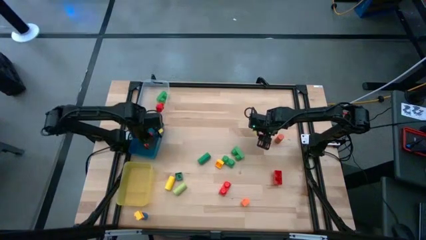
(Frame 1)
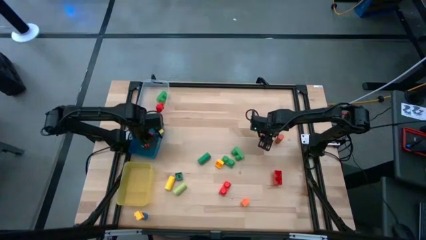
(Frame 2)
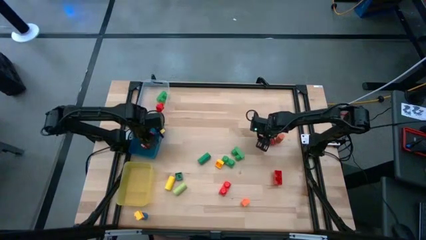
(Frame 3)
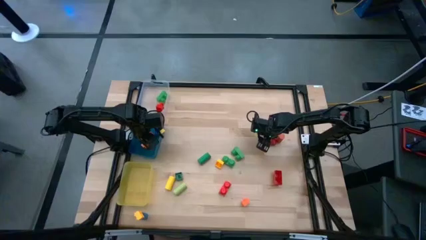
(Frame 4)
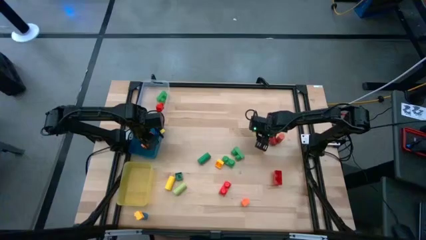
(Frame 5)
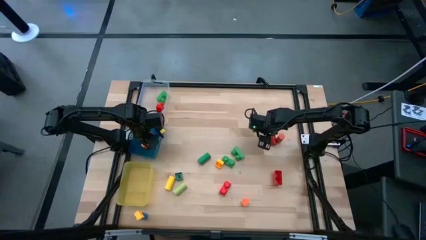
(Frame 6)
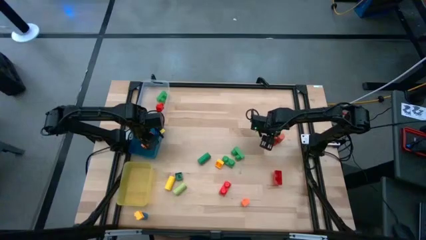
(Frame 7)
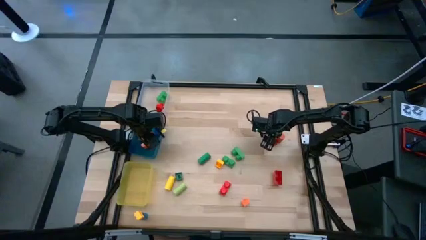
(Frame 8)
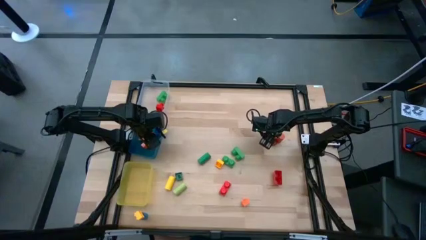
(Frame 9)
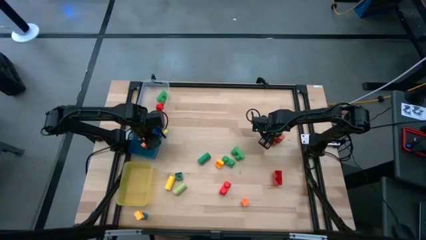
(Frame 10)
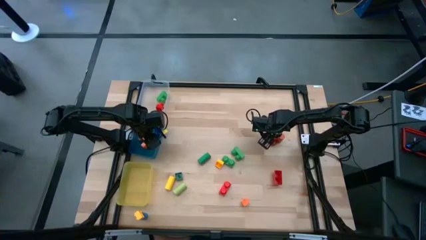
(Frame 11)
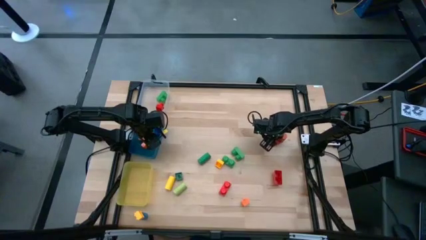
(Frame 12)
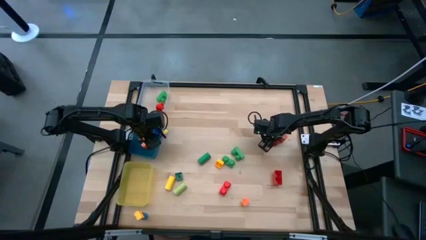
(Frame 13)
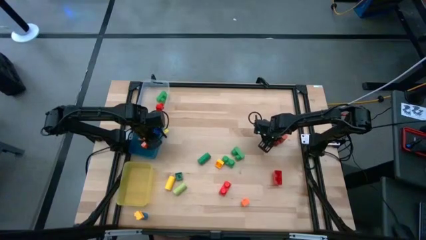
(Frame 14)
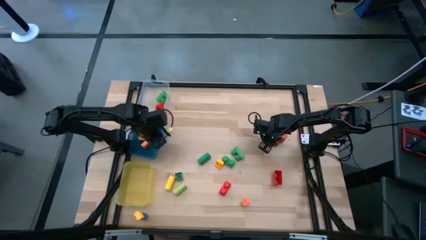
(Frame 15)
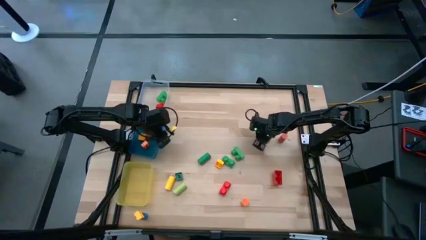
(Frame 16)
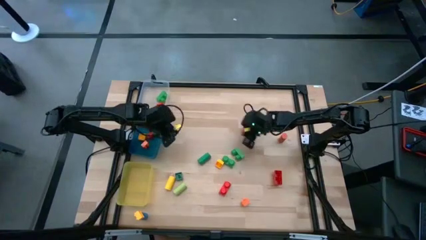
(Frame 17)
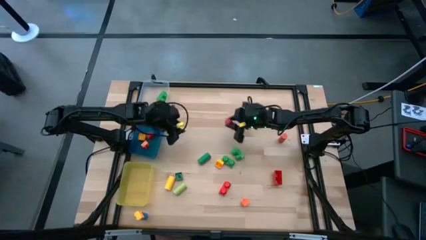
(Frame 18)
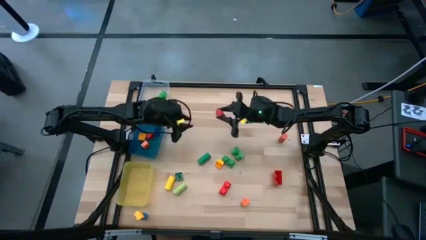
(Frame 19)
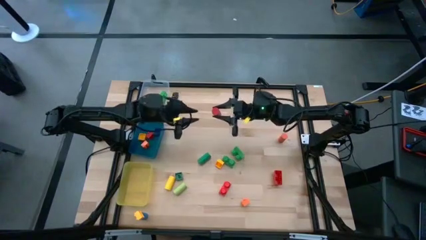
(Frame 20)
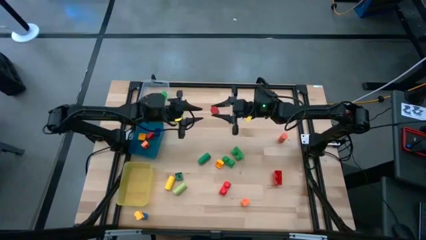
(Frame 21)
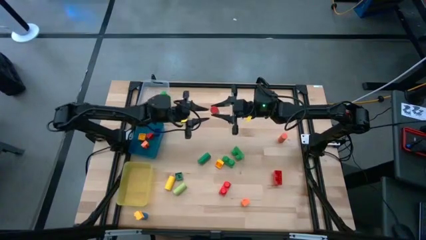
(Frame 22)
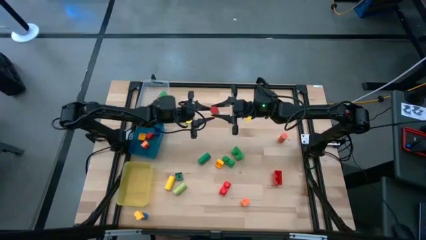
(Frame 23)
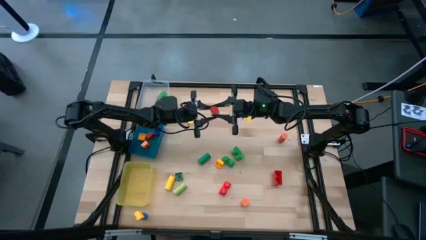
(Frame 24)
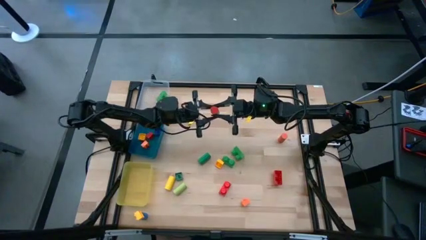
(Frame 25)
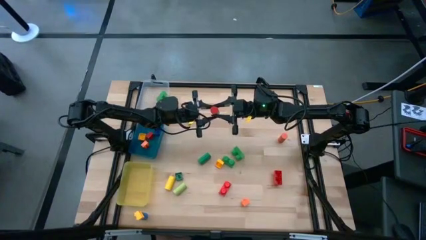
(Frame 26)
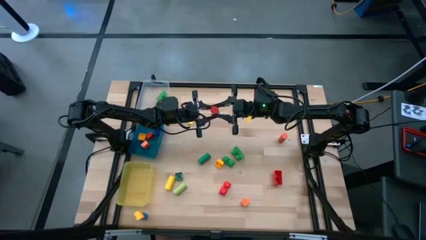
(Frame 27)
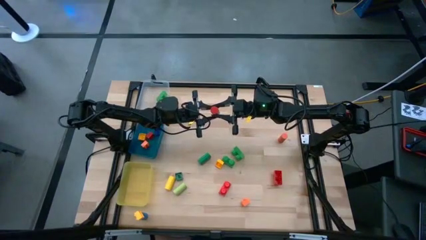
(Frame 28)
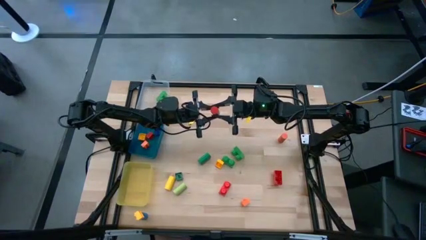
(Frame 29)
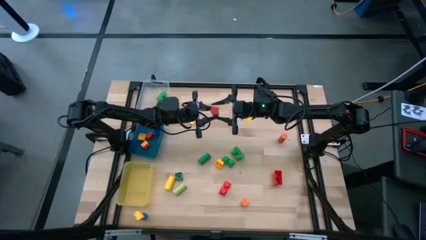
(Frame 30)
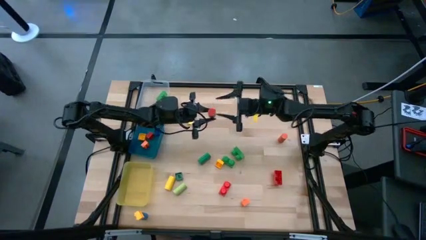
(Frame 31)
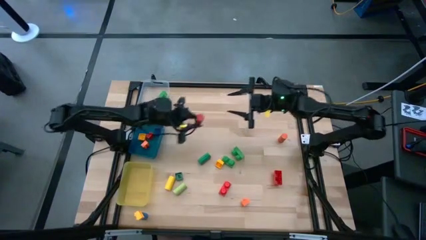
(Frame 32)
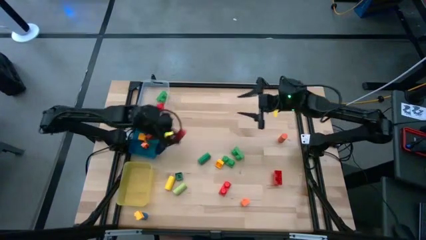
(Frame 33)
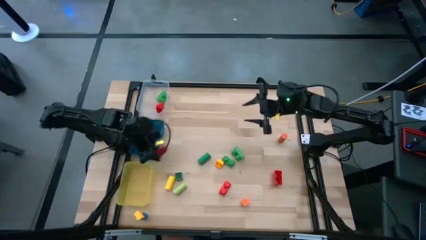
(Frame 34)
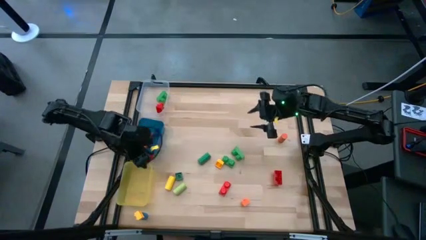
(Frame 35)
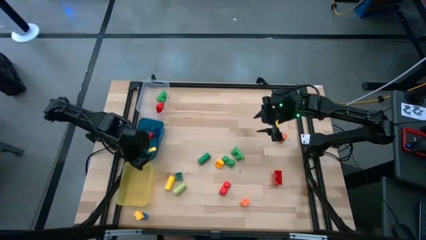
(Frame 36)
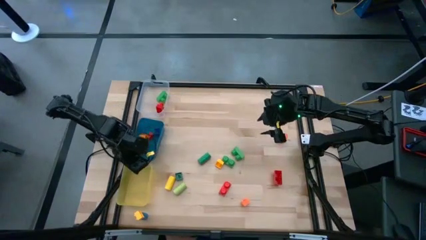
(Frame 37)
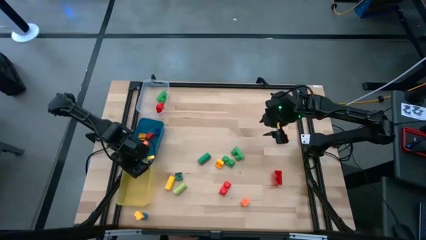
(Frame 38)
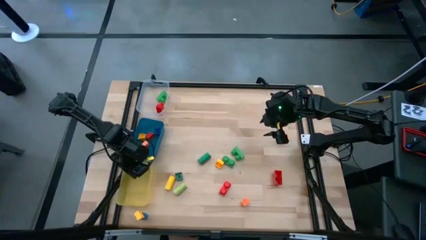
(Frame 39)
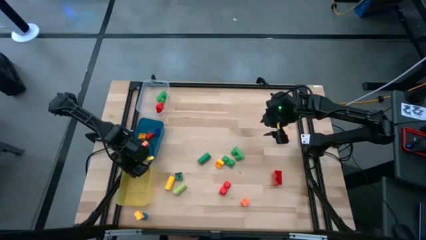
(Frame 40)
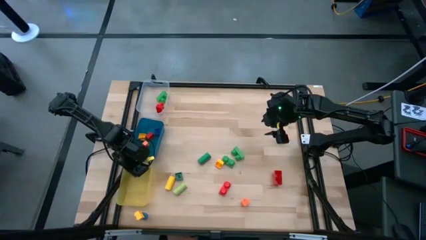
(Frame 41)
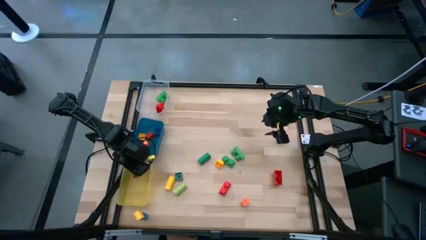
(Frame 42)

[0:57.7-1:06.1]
Task: Sort blocks by size
Put the red cylindrical block into the yellow bin

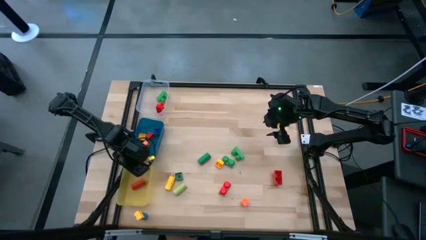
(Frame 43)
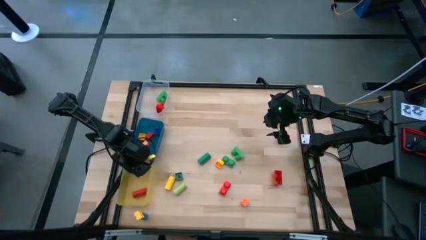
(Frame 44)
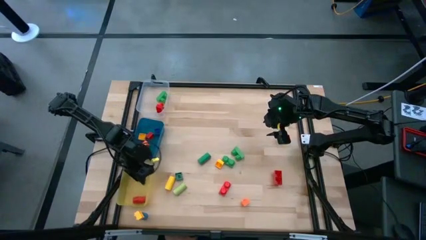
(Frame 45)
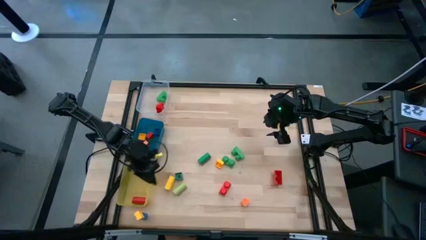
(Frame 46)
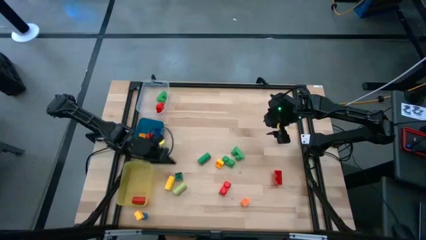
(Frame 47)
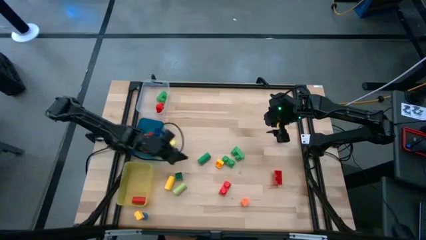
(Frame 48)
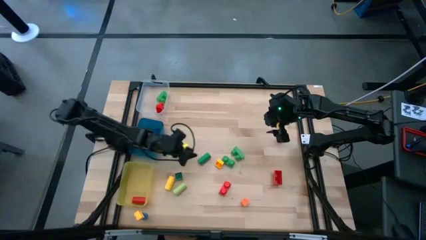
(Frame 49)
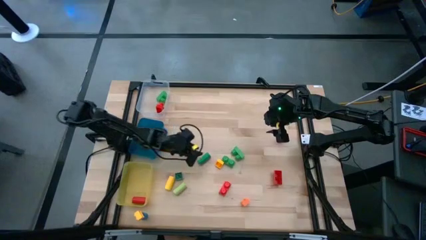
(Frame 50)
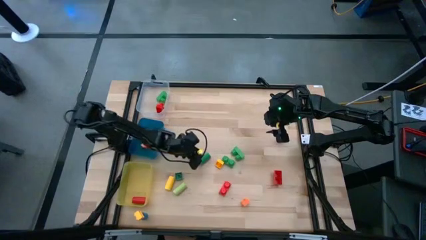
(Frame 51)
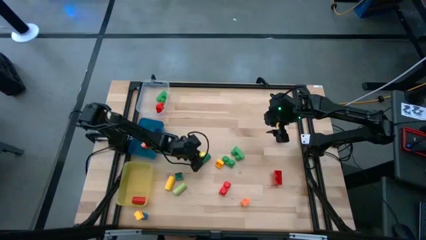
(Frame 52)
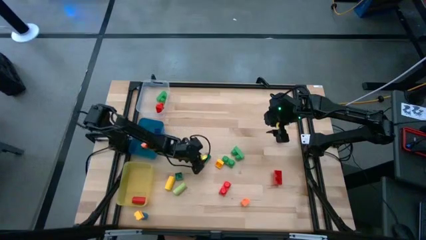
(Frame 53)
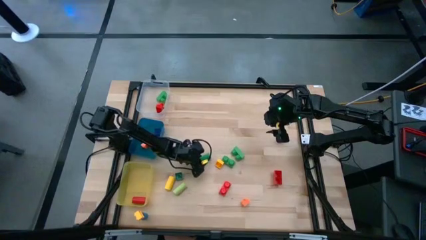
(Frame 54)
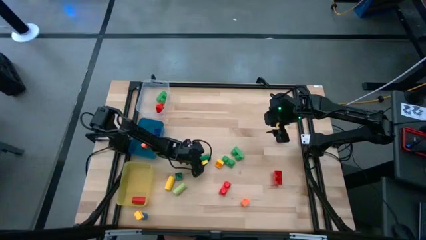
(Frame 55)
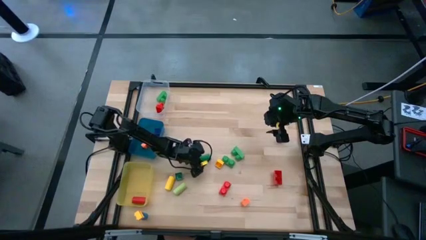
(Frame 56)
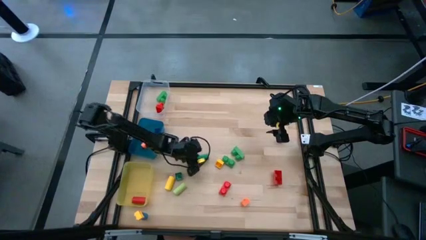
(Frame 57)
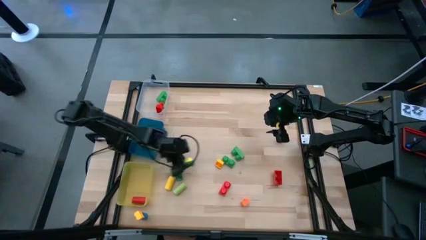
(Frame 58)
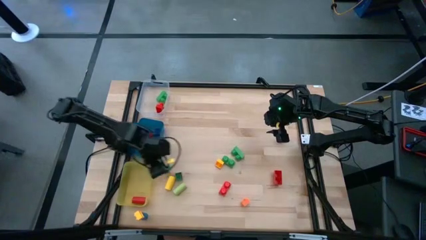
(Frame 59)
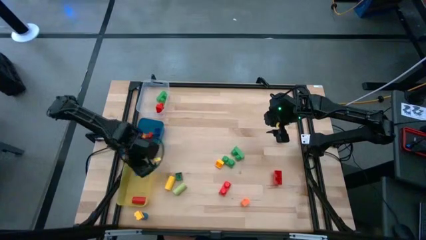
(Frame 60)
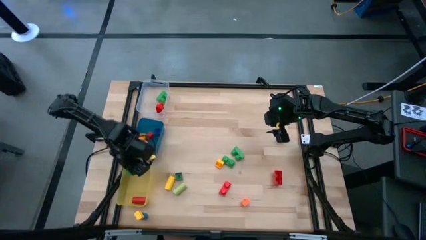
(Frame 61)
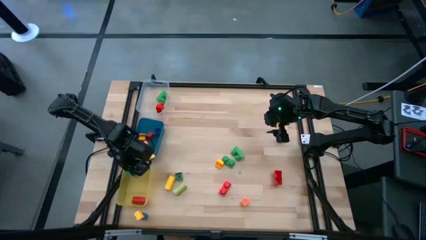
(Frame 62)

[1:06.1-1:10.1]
Put the green cylindrical block into the yellow bin

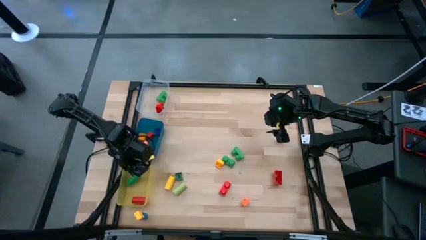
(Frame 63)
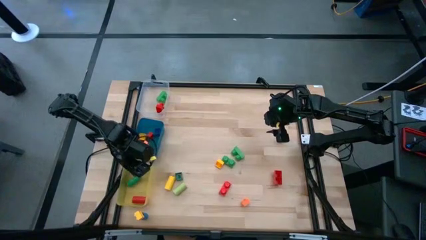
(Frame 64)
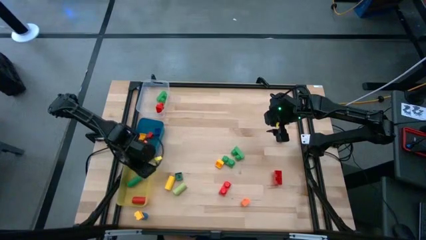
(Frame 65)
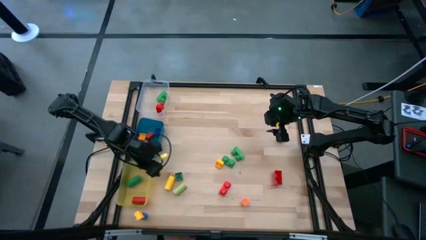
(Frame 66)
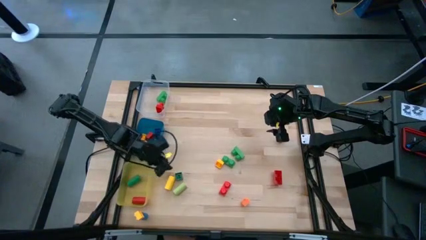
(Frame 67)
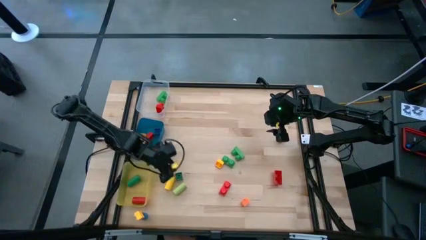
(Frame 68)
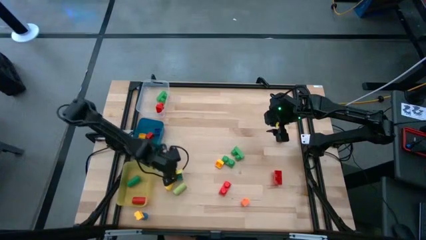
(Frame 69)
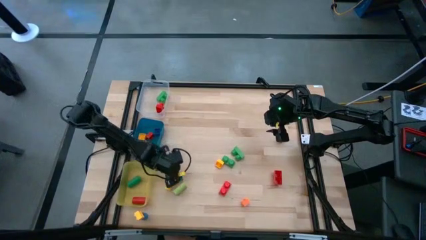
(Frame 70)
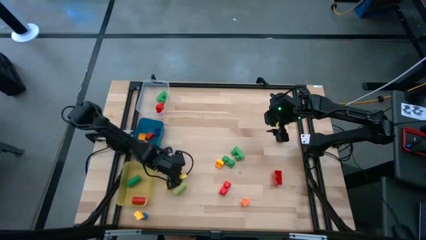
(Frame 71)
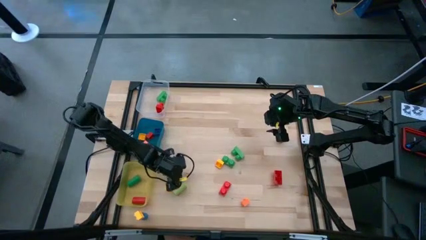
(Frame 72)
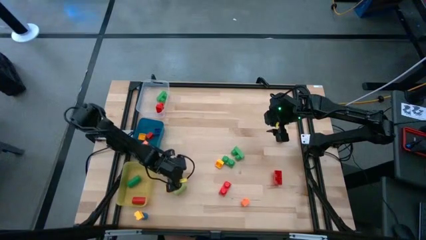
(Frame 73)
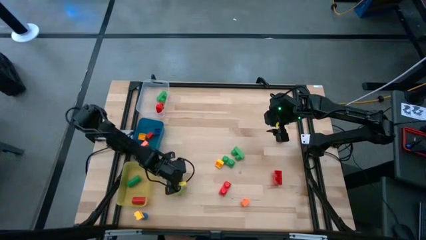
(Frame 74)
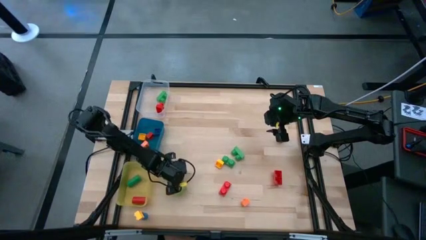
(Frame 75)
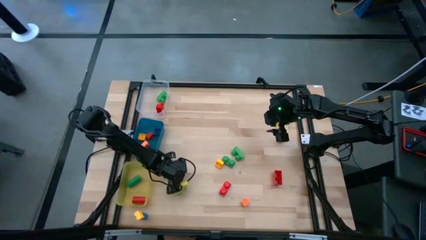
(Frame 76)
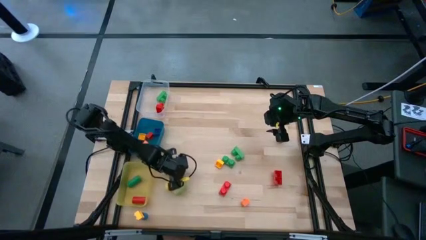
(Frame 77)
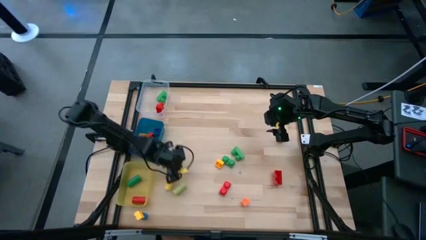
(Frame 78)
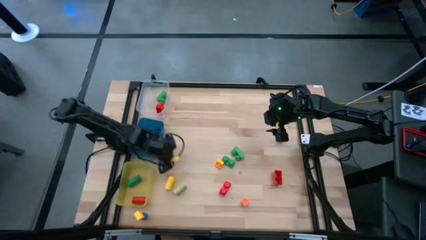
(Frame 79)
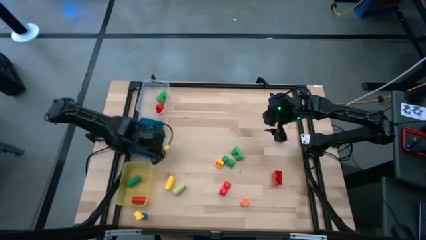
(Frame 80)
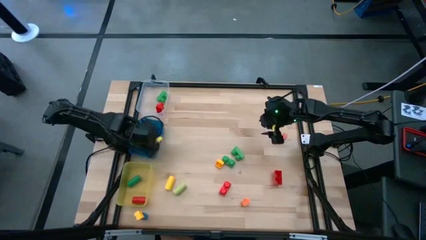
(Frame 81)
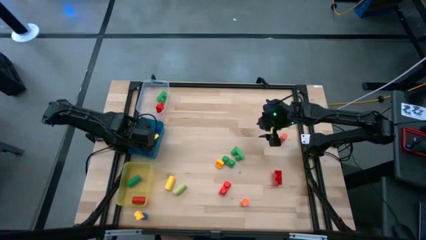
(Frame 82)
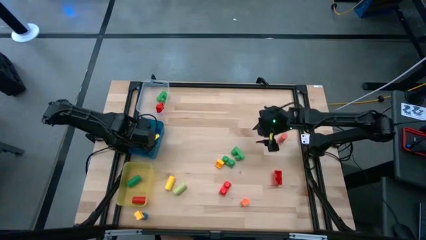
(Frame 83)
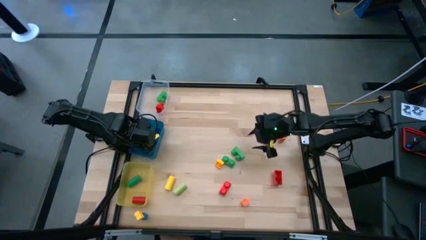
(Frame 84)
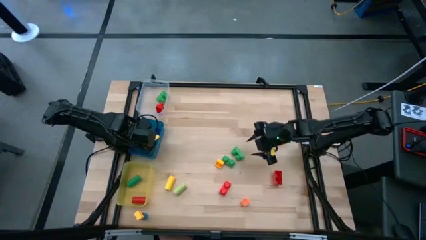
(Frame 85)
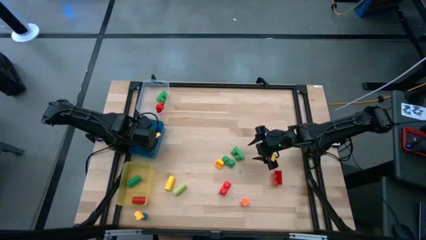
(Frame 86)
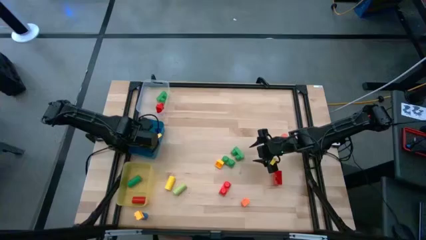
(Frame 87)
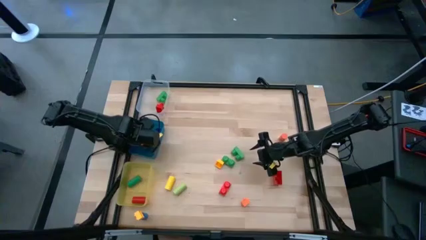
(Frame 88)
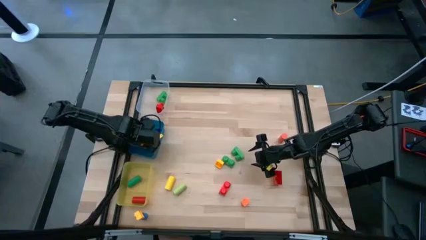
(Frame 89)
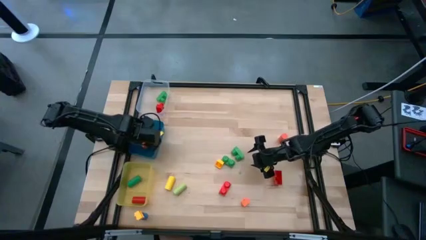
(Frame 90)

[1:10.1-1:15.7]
Put the green 4 stud game piece into the blue bin
